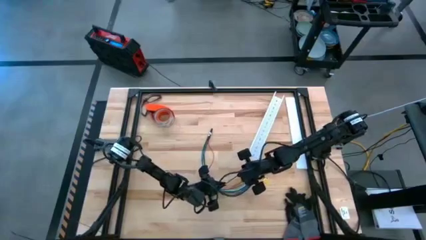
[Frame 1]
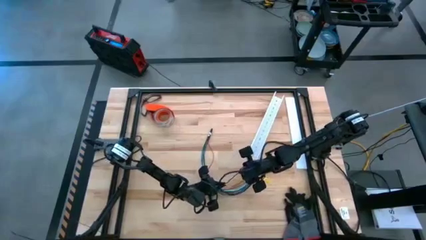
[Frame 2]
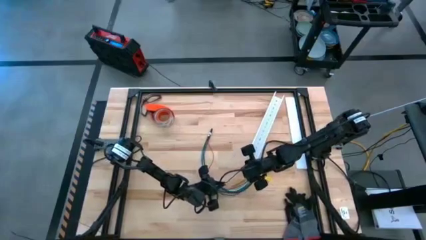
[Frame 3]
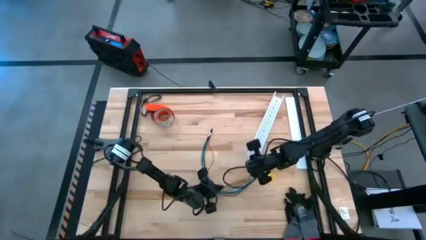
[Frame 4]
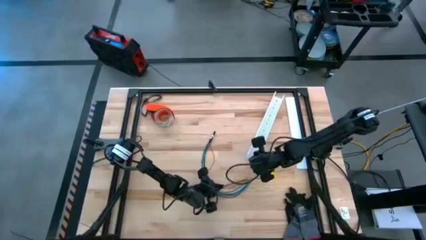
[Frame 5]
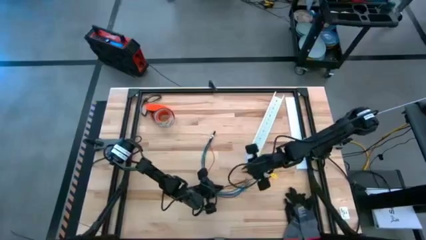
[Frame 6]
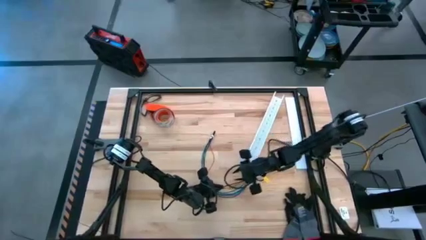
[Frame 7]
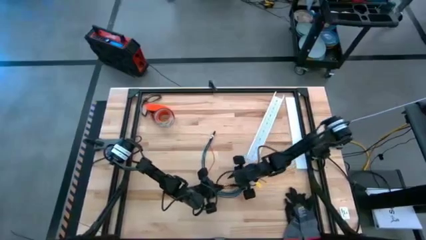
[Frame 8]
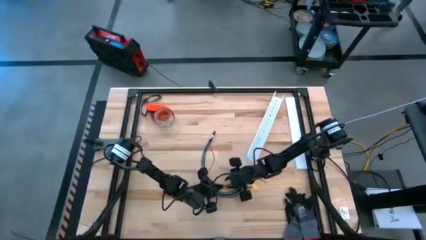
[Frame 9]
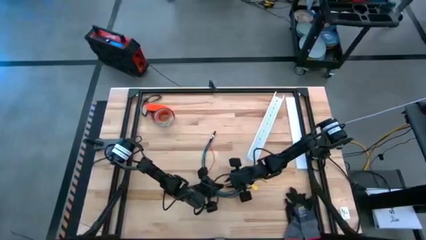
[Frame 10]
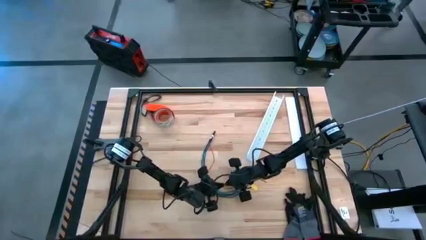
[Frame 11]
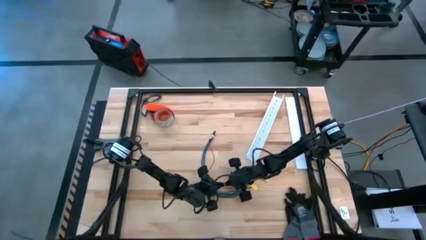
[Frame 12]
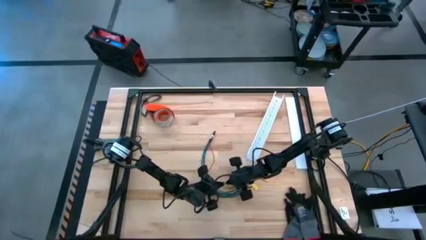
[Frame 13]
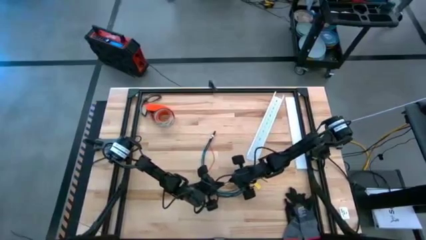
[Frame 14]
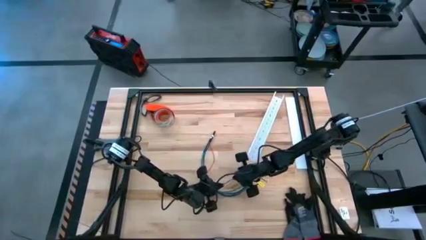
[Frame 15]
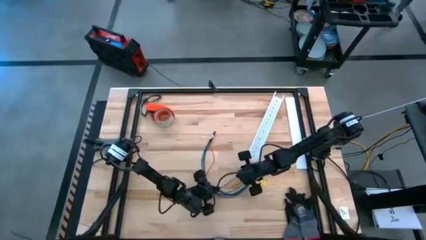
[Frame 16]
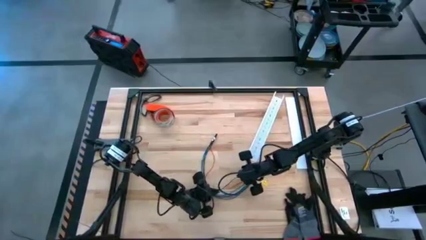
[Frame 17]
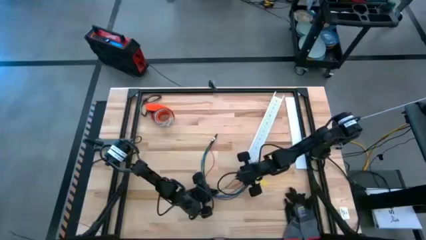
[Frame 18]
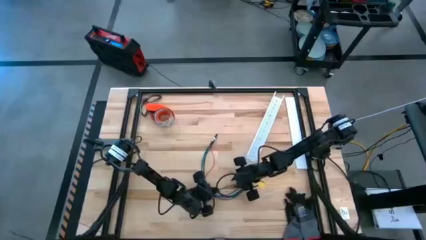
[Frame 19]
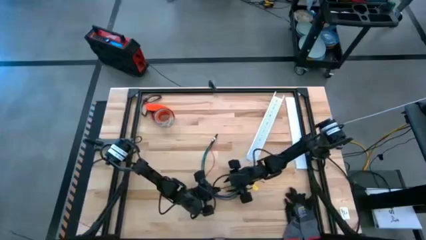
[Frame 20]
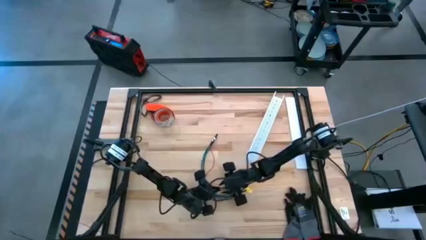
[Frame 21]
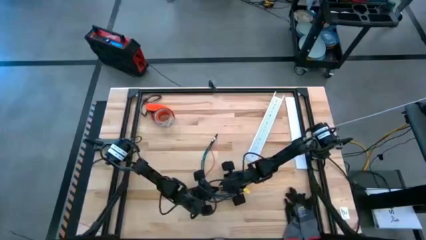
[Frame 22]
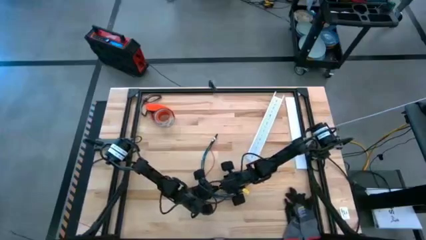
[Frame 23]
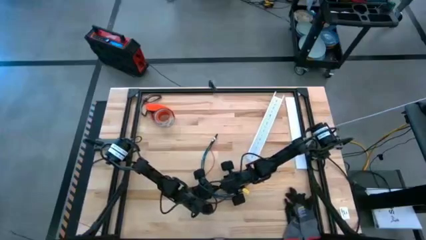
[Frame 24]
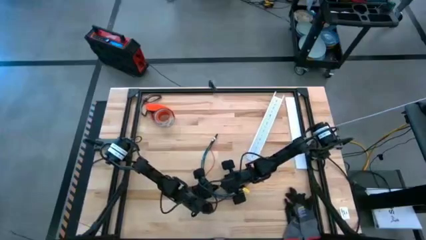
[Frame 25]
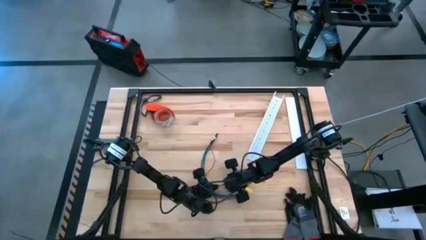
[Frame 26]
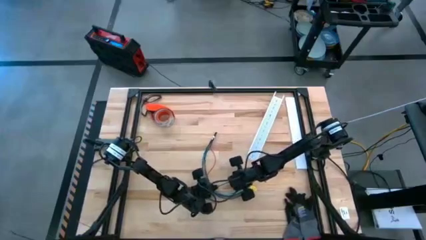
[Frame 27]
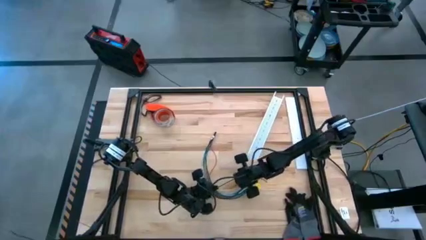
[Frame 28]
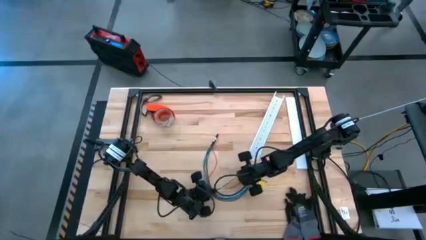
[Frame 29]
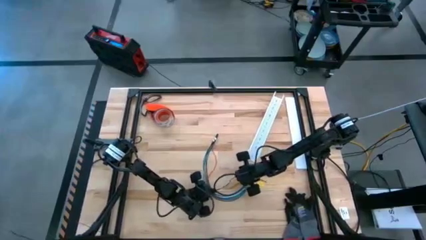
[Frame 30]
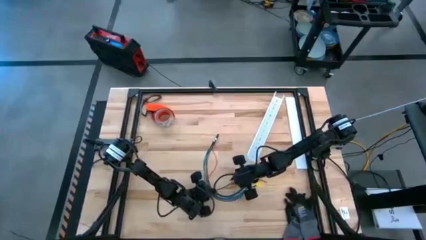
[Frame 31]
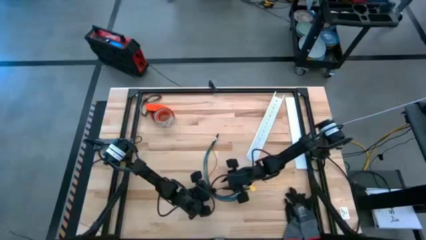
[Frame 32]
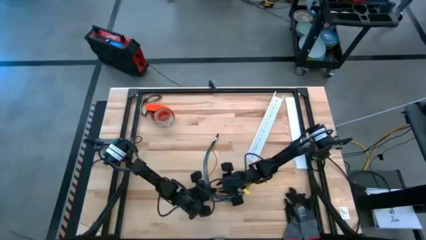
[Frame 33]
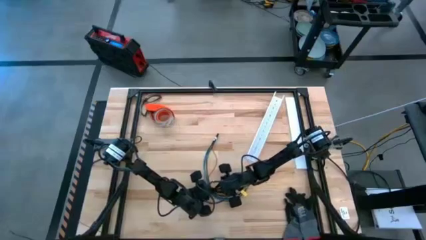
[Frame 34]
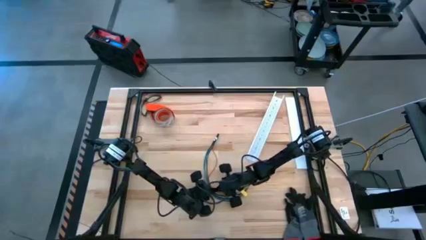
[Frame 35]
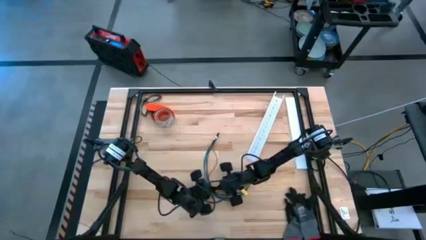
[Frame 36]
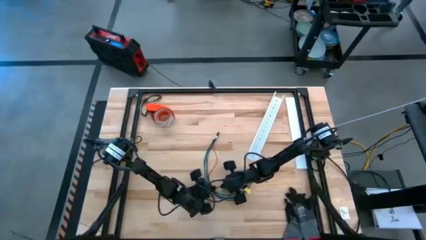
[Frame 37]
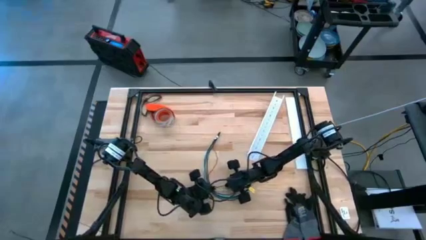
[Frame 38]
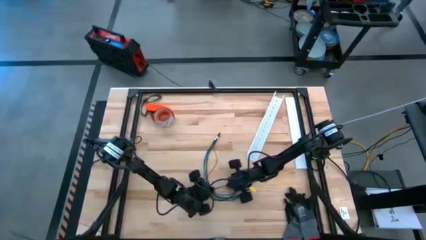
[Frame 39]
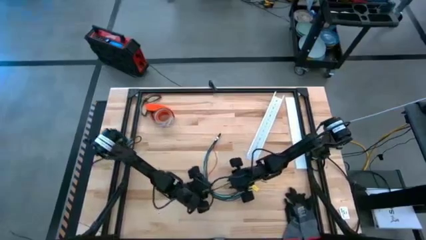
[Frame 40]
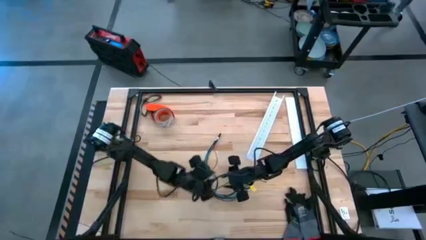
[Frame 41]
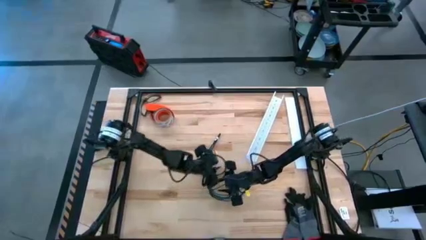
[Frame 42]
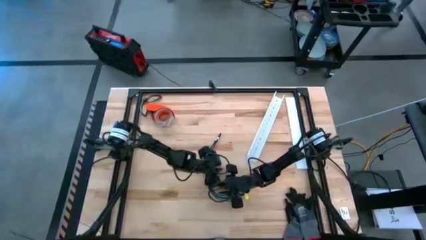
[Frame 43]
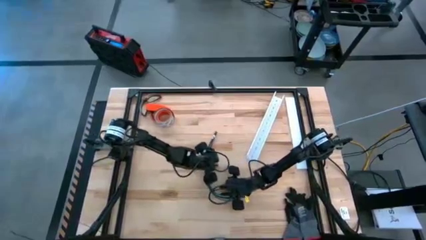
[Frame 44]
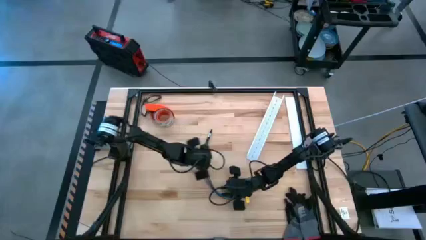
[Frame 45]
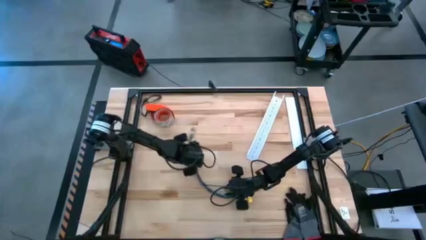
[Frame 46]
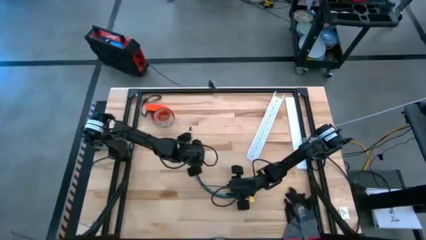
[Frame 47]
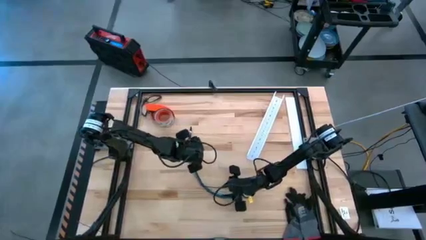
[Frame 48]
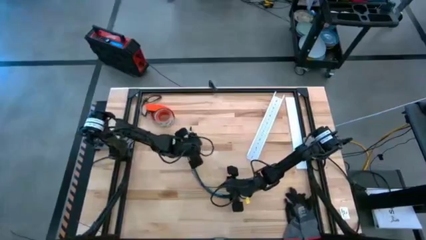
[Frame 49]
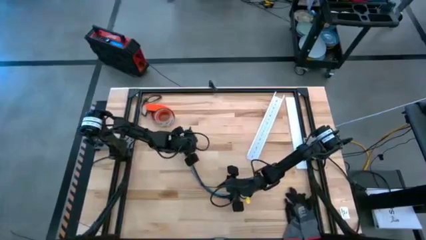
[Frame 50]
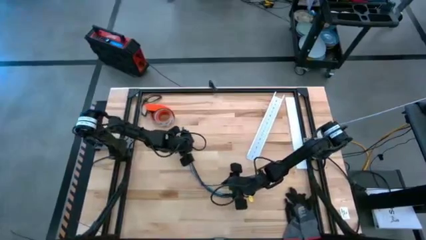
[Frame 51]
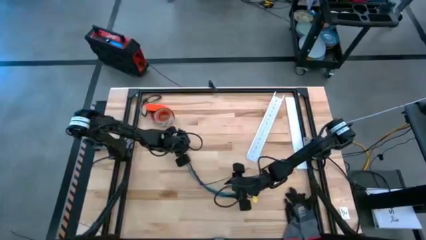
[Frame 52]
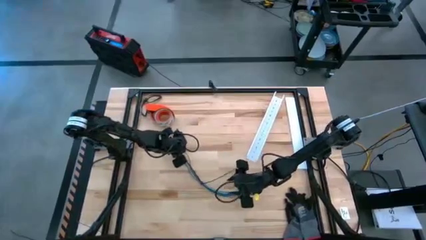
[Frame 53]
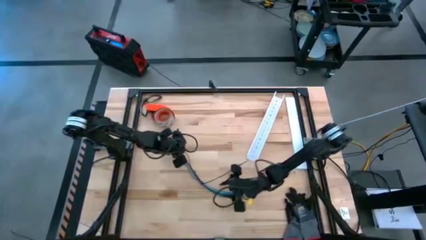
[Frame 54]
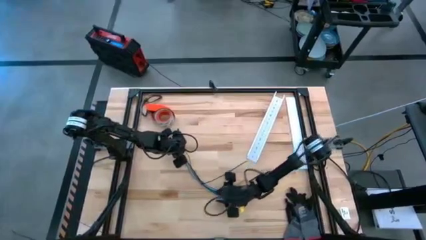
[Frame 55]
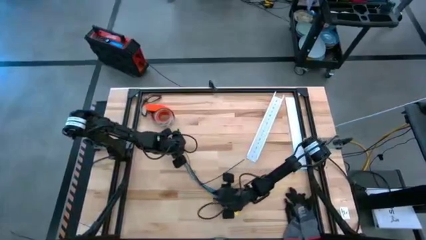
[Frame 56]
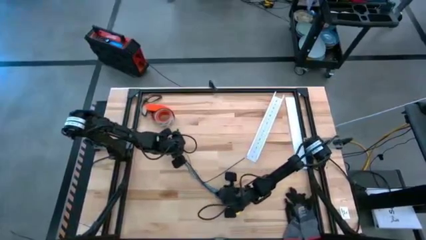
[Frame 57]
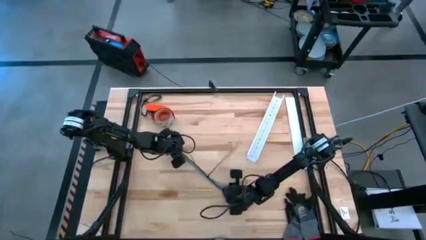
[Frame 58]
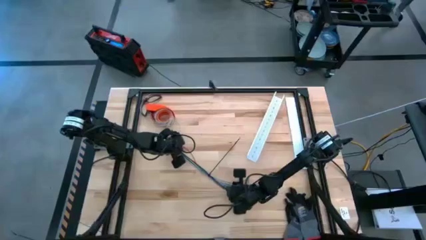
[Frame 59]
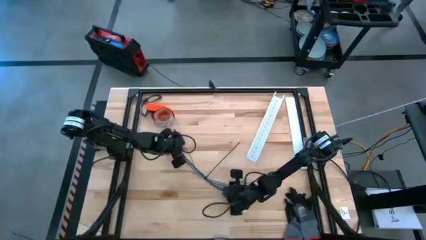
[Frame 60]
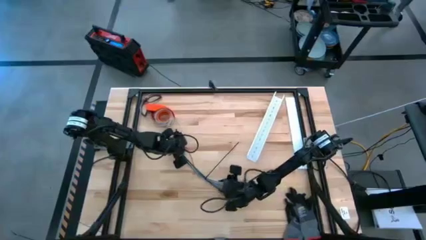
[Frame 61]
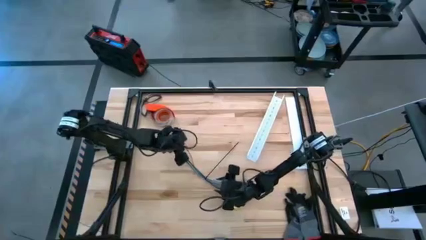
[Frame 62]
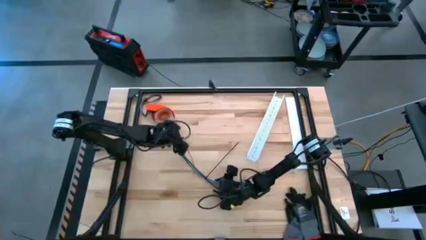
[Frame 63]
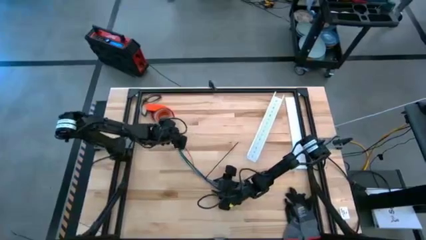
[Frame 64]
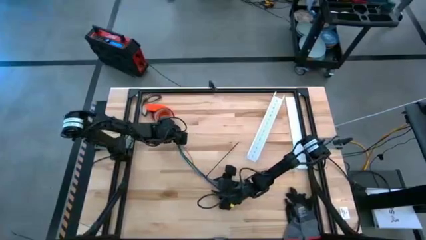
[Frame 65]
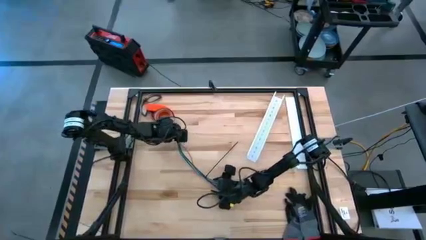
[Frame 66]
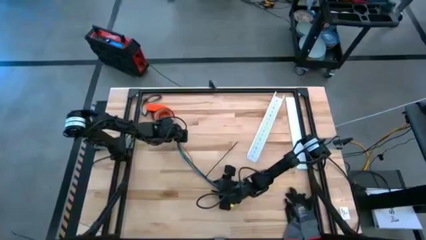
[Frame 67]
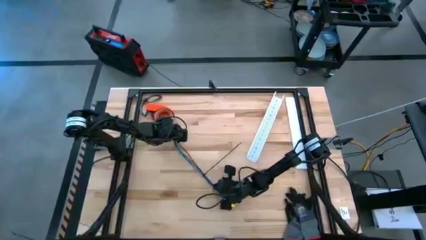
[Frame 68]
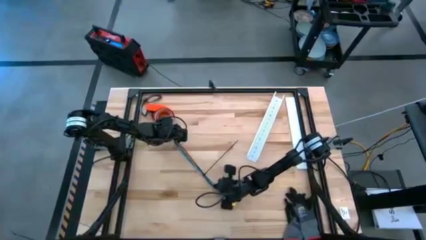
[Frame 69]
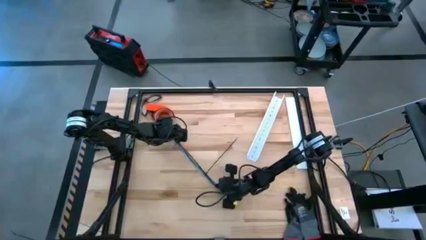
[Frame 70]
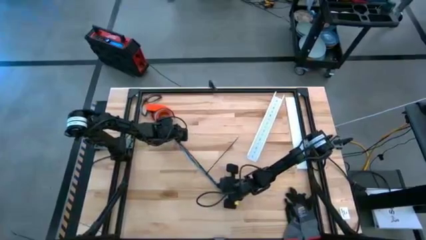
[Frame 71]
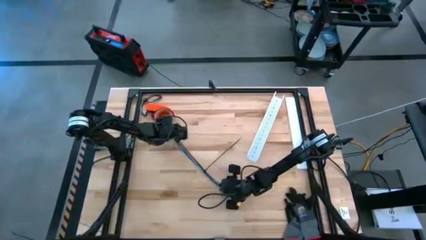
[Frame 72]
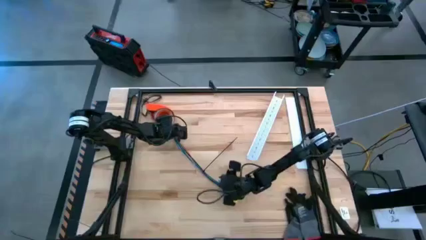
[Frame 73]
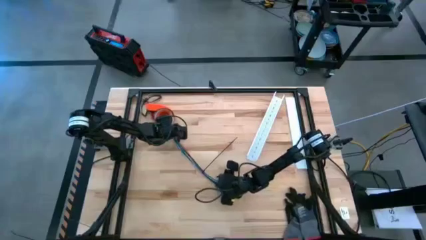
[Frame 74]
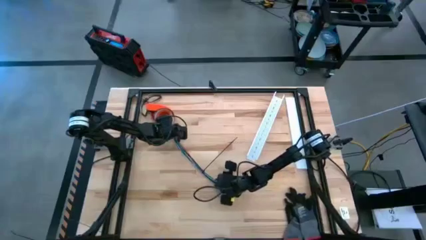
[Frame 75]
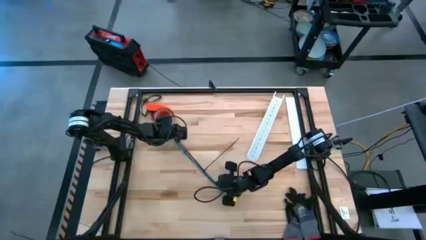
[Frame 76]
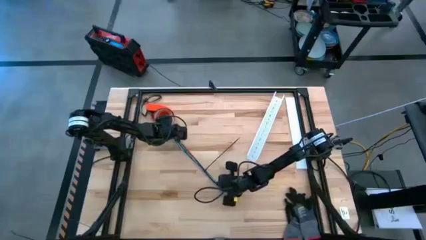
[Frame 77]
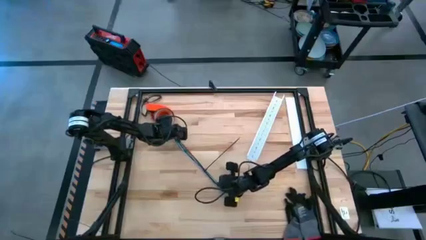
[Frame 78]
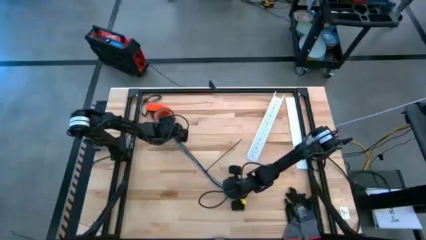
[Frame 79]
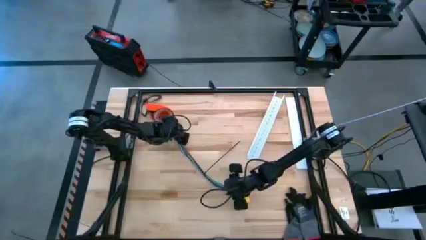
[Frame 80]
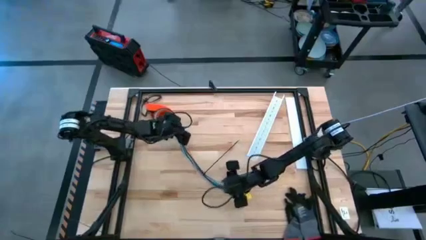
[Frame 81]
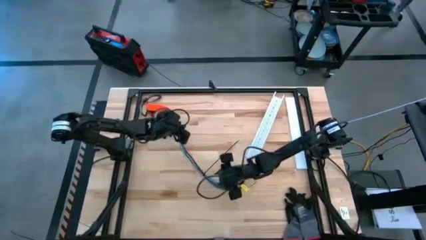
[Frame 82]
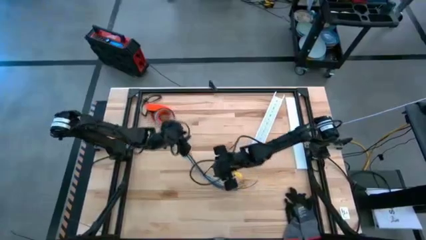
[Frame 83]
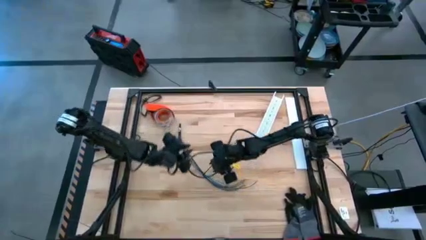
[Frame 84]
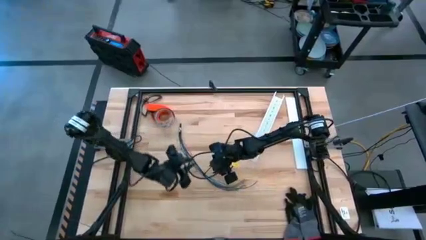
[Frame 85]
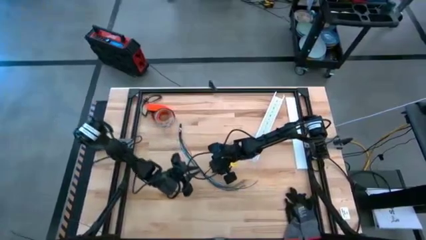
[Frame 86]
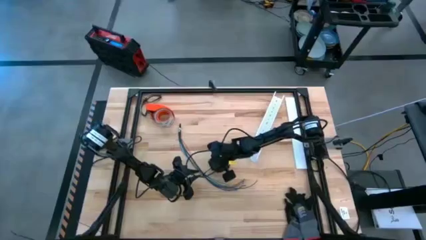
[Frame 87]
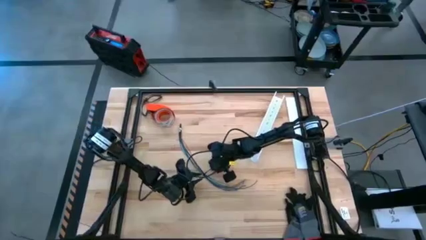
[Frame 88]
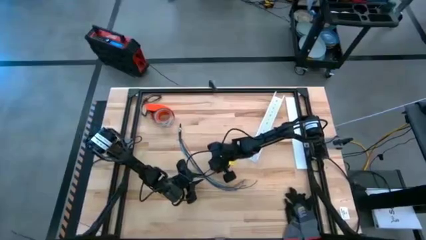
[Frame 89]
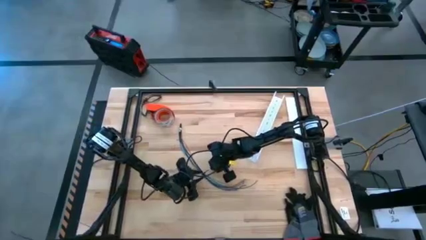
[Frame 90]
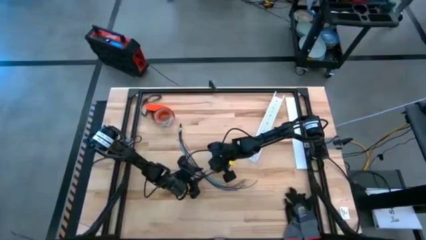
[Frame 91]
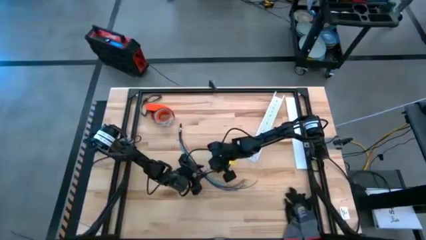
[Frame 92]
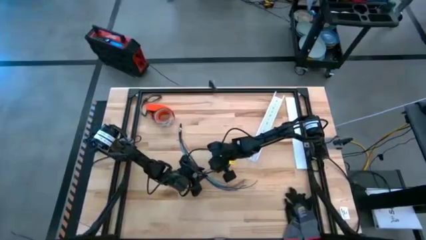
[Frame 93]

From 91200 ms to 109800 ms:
Task: Ziptie cables
Wrap the cables together using a black zip tie
